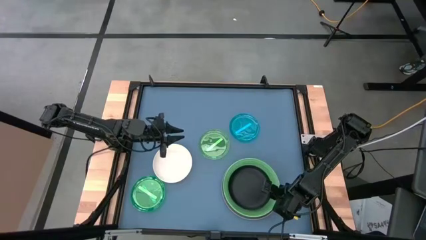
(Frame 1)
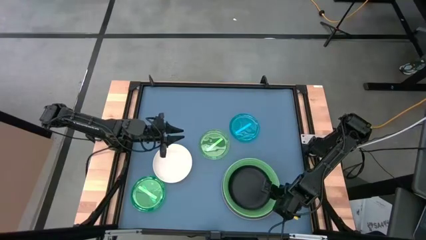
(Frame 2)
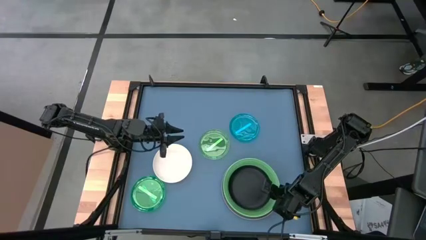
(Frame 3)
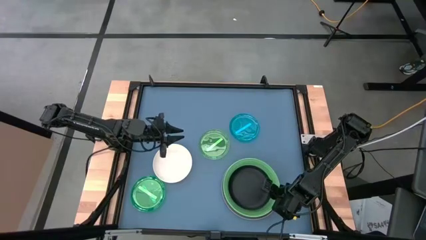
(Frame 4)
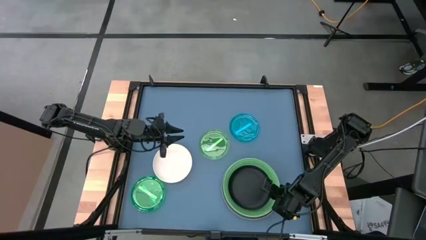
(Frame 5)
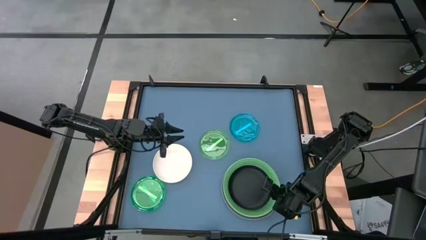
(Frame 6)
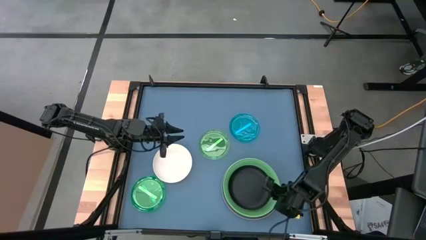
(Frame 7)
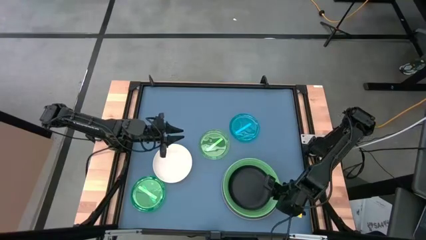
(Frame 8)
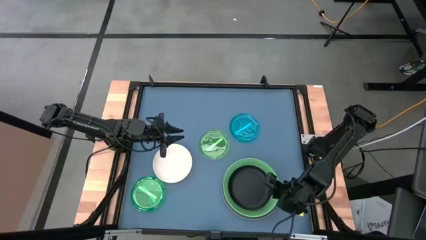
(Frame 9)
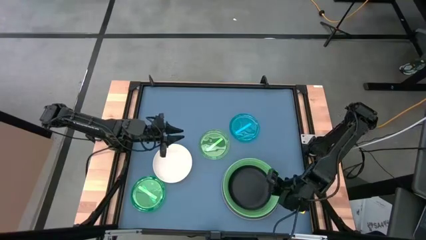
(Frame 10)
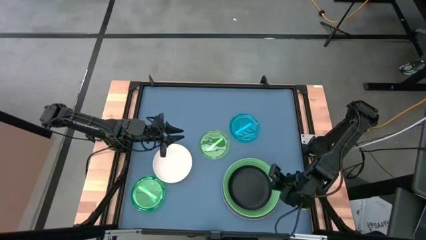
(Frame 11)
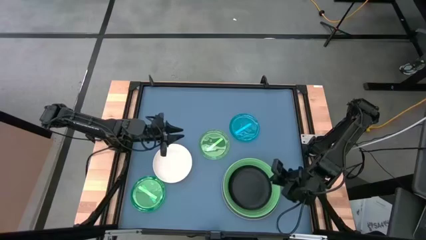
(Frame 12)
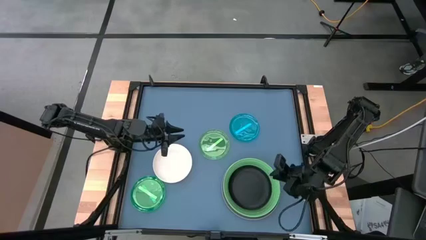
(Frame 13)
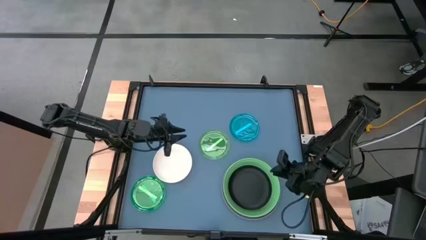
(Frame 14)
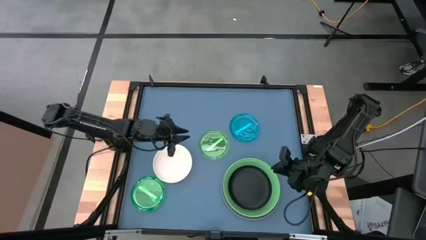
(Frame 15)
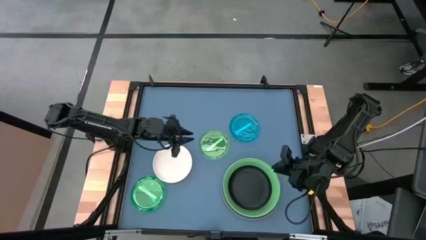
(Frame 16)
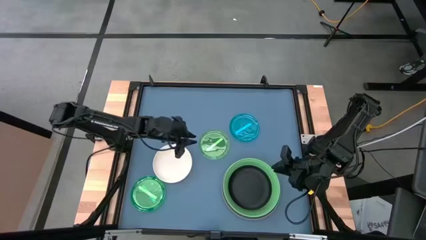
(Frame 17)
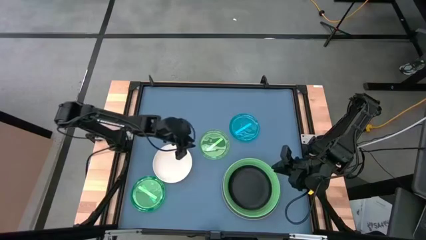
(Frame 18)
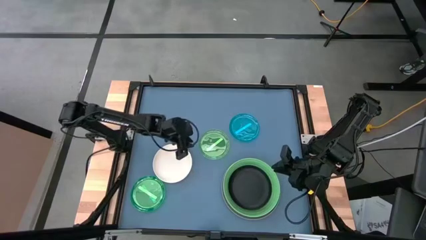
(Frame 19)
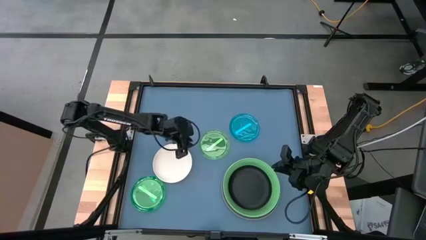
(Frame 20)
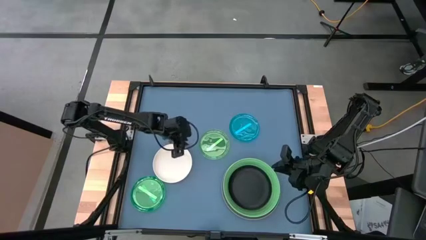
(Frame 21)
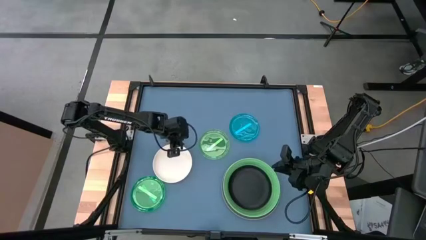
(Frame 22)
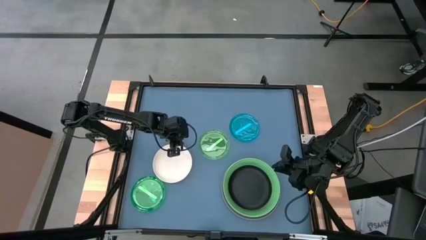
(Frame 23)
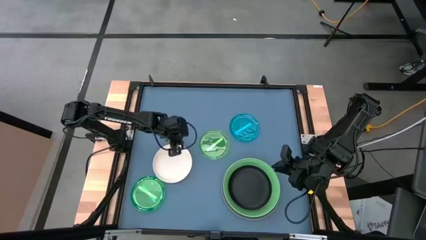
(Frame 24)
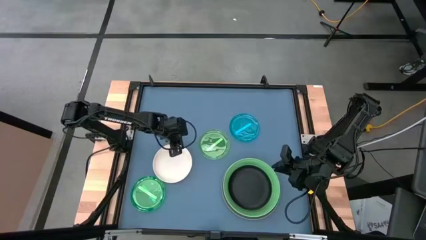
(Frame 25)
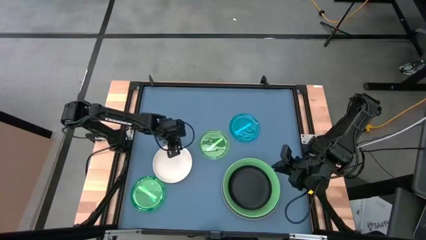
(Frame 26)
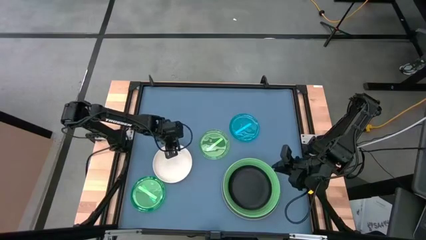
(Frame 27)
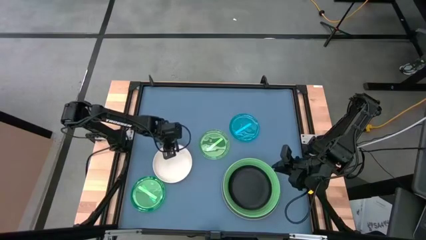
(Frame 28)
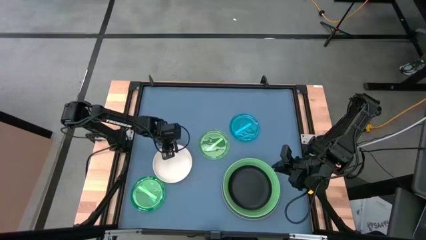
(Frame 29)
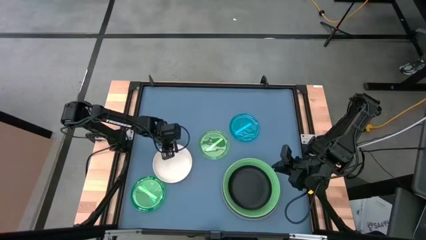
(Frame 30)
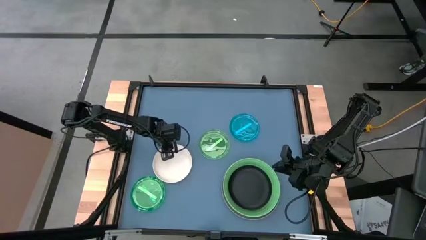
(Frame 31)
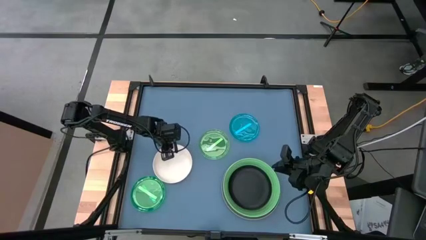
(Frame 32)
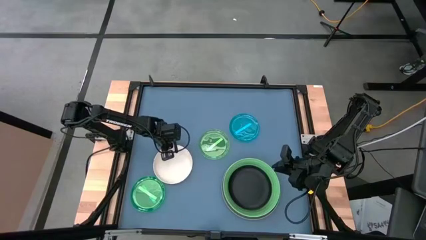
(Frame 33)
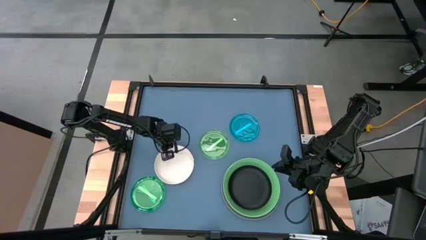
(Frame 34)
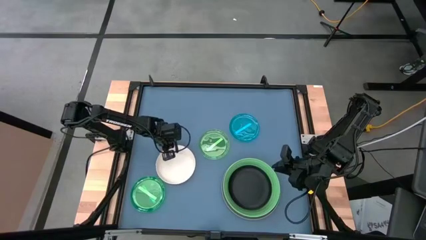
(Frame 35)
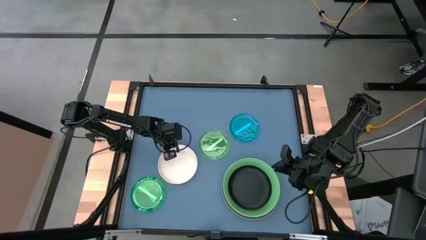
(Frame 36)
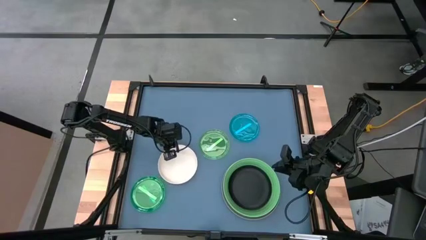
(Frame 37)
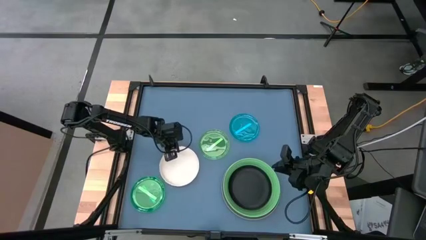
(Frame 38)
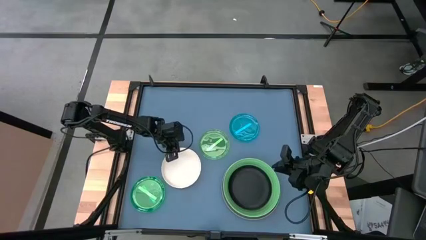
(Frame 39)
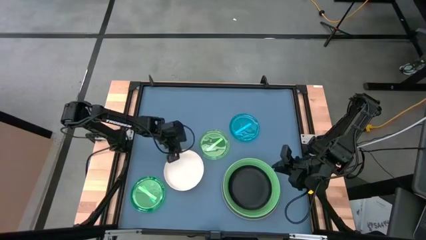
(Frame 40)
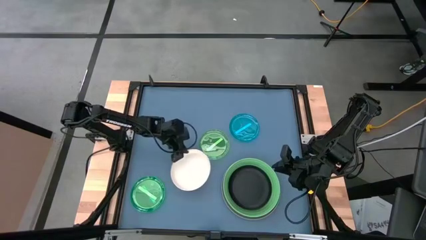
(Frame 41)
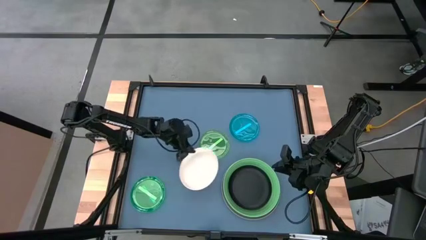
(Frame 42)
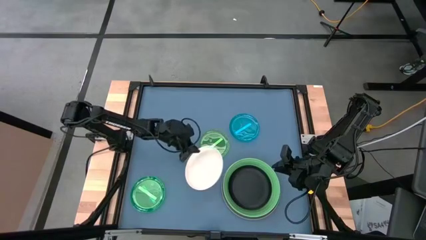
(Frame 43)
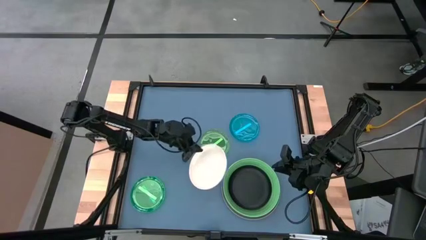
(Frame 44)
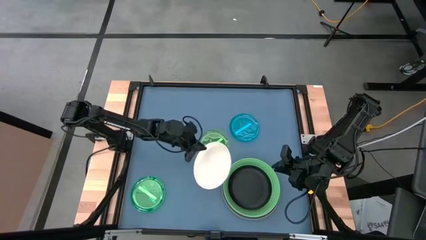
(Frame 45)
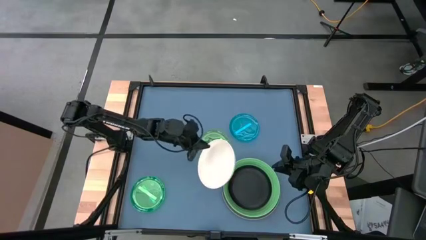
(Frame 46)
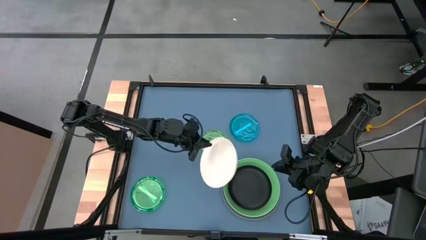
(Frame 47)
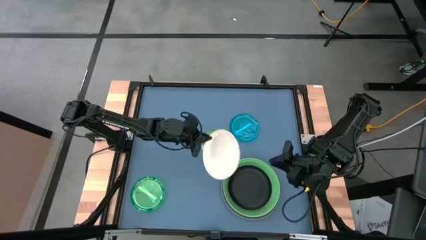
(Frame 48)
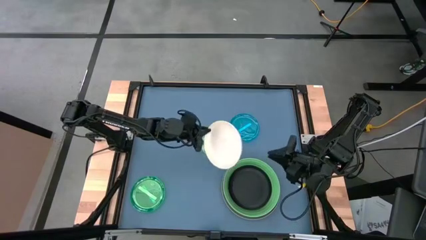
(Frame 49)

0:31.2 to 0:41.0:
Task: Stack plastic plates
Stack the white plate on top of the black plate

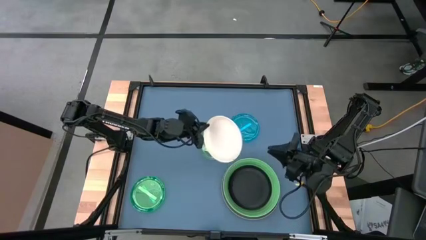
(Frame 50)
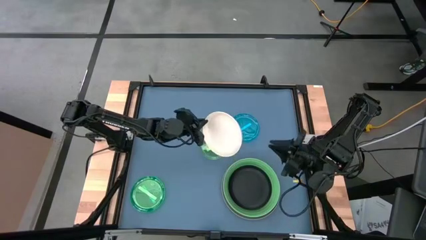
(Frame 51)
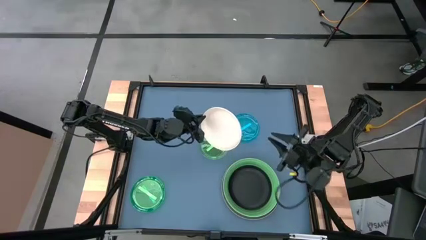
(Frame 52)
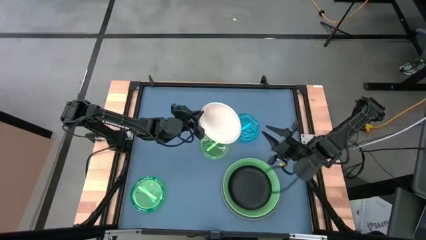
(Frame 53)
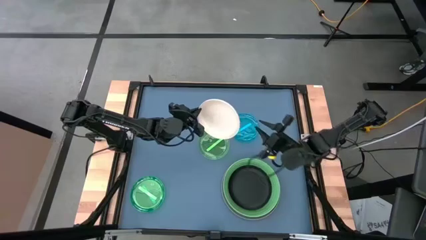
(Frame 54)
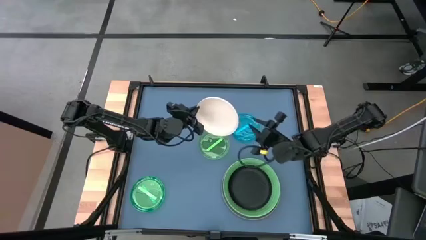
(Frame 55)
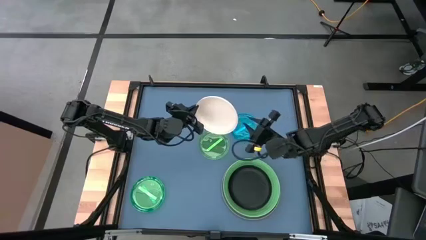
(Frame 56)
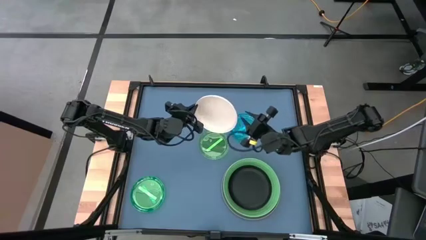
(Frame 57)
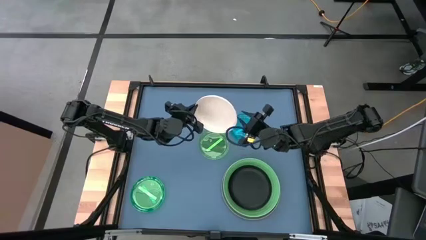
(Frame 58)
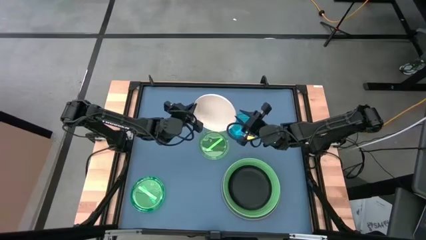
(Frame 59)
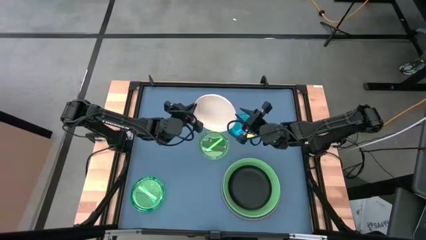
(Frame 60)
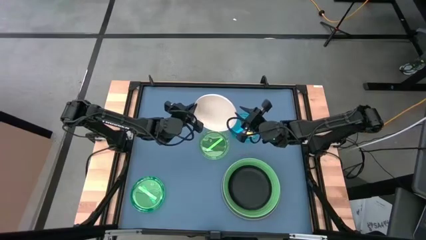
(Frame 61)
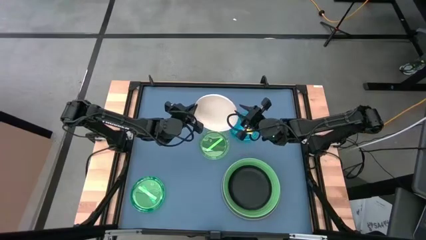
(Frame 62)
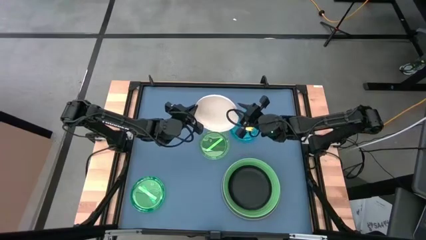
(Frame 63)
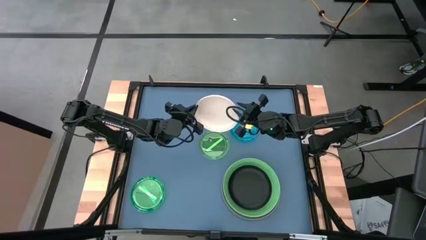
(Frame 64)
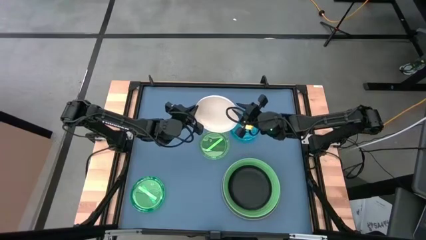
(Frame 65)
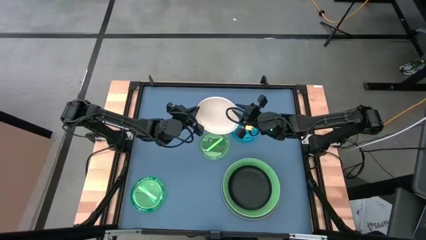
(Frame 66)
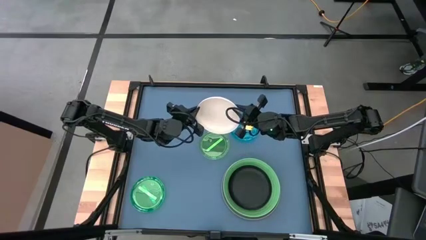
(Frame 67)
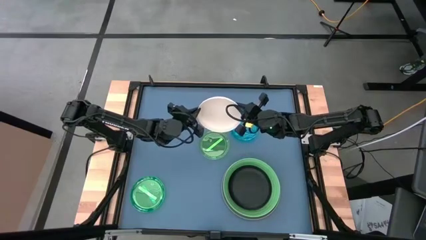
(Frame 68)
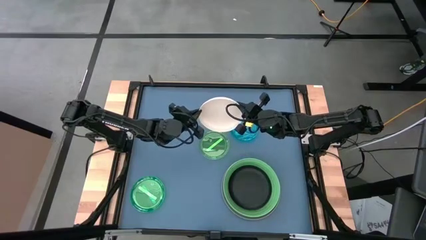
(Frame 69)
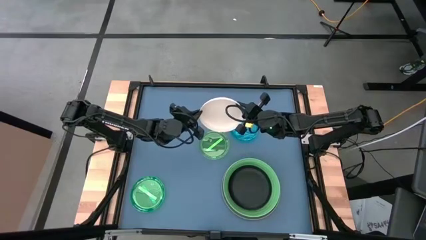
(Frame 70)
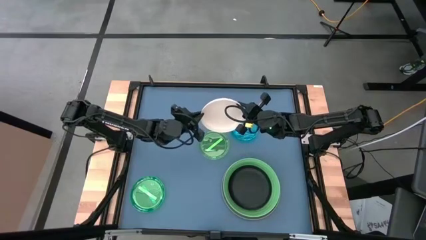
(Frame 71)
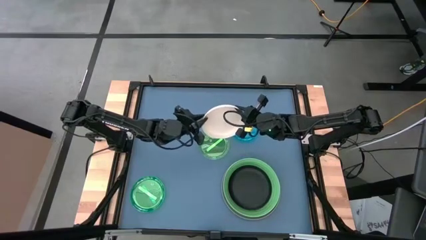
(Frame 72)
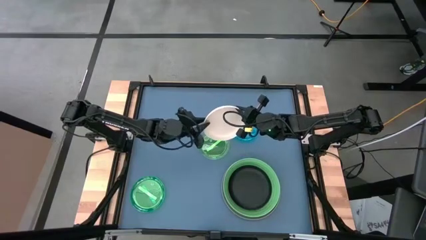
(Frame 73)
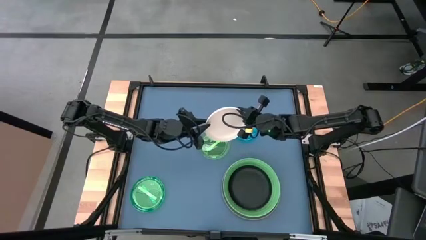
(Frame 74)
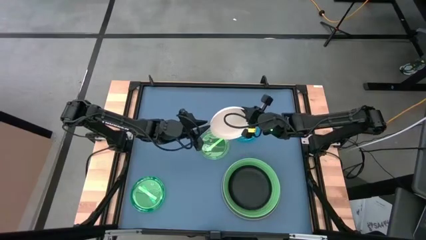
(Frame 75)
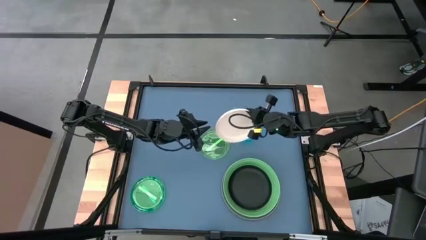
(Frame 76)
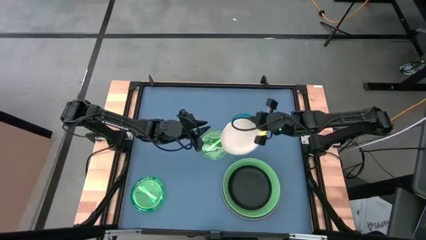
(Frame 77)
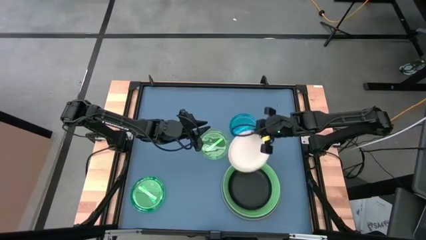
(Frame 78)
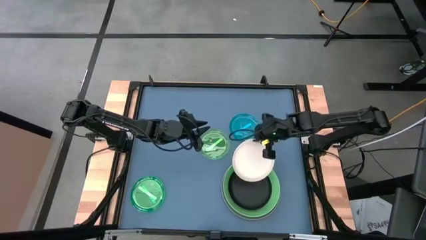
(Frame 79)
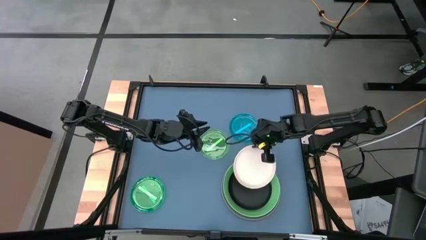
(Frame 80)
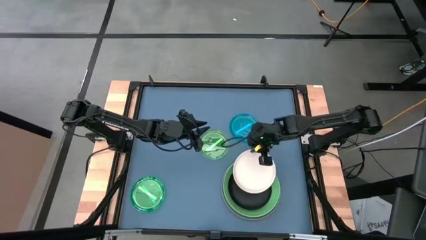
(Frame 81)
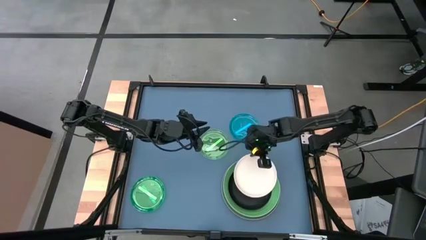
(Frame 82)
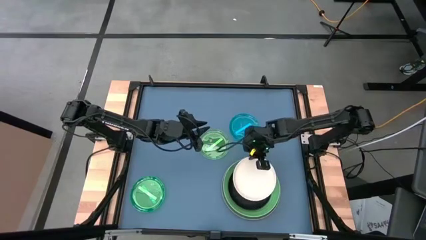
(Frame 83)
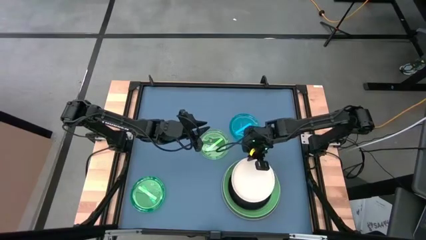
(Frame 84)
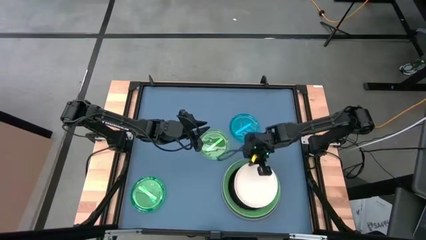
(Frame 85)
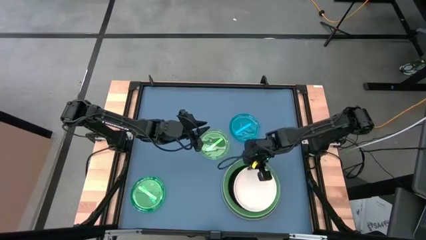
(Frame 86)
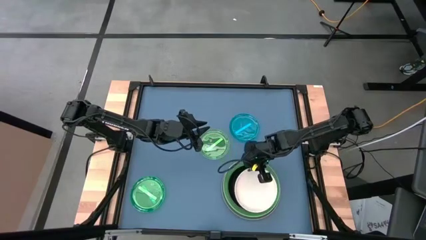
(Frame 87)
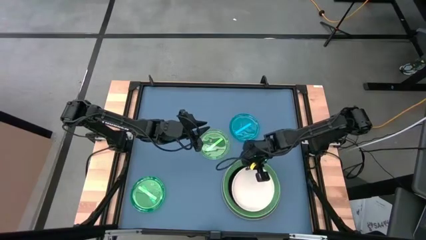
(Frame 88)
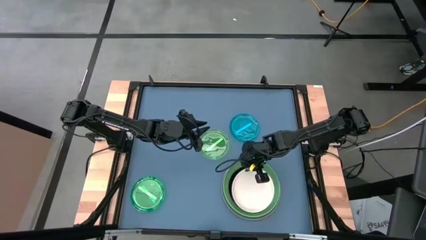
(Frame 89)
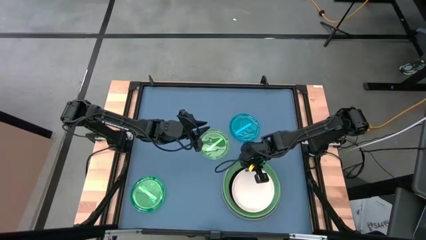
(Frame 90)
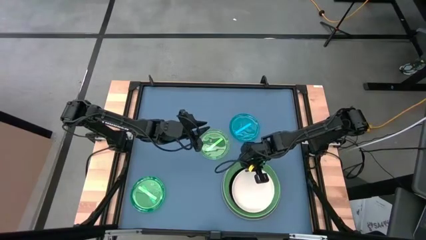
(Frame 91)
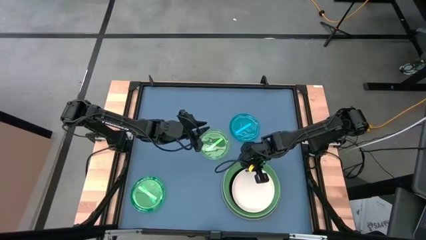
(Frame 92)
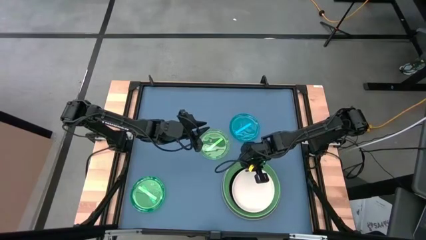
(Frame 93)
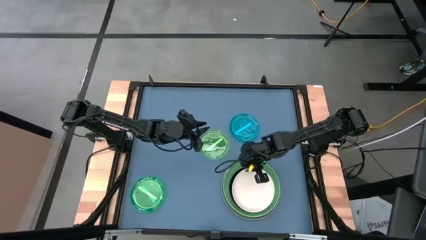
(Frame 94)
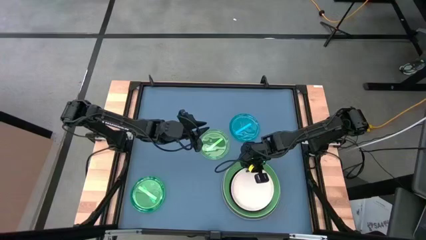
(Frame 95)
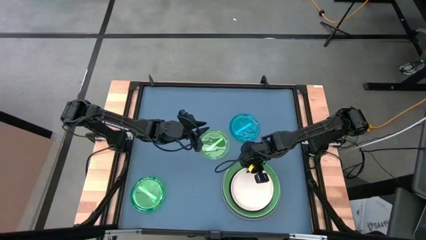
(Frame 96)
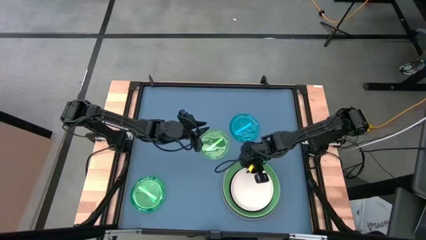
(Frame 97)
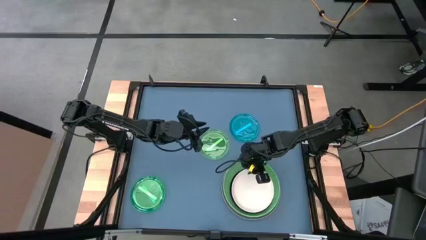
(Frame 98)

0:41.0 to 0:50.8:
Stack the white plate on top of the black plate
